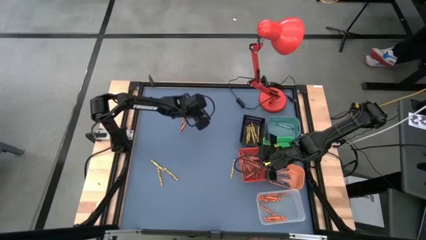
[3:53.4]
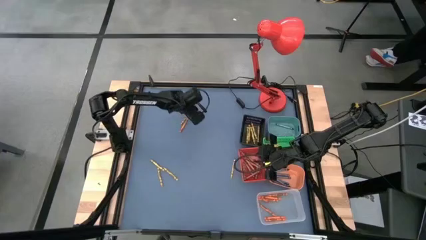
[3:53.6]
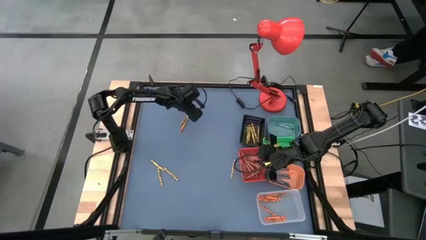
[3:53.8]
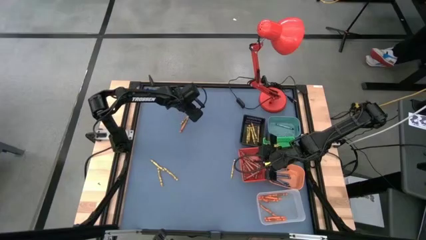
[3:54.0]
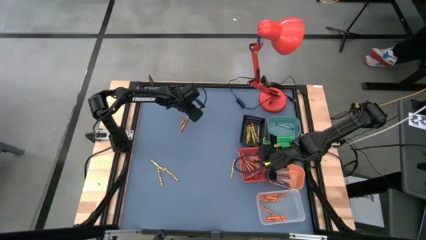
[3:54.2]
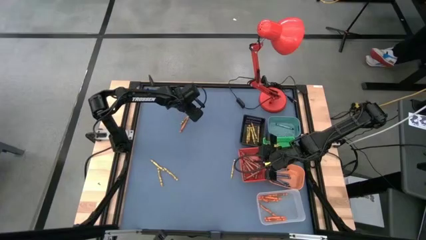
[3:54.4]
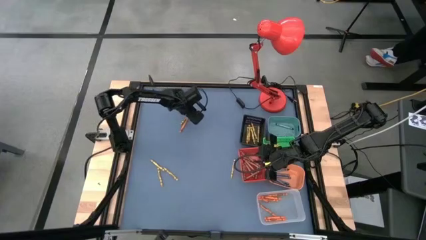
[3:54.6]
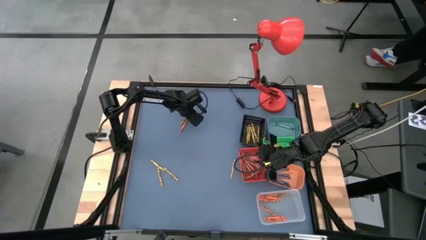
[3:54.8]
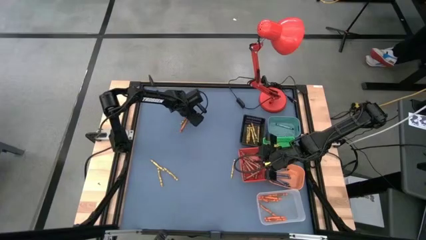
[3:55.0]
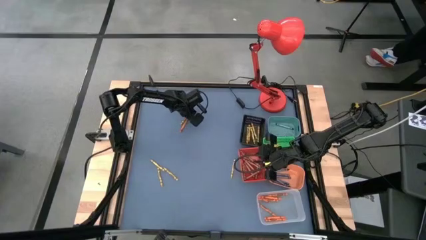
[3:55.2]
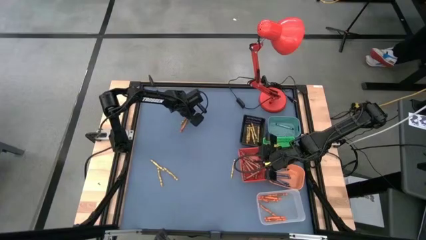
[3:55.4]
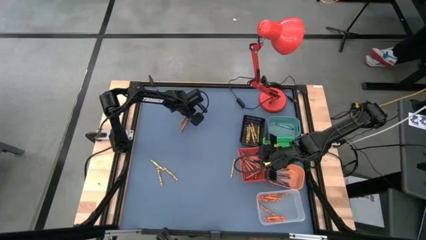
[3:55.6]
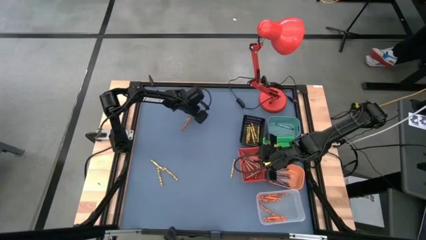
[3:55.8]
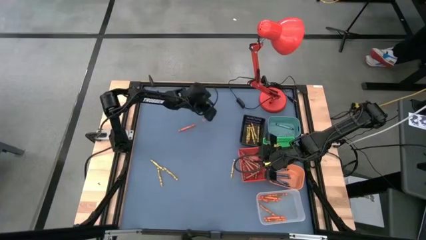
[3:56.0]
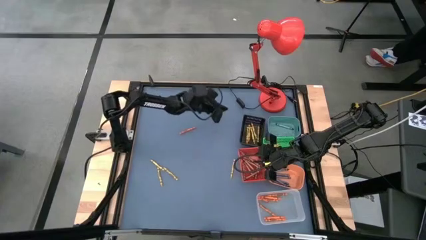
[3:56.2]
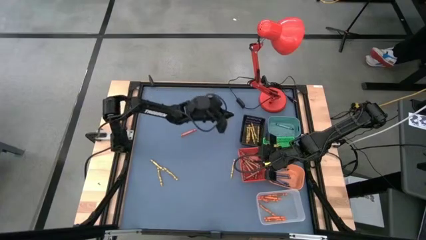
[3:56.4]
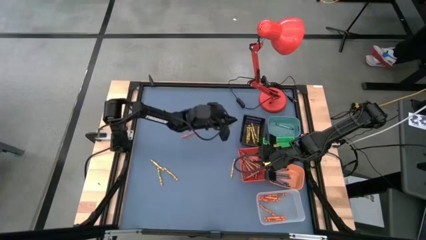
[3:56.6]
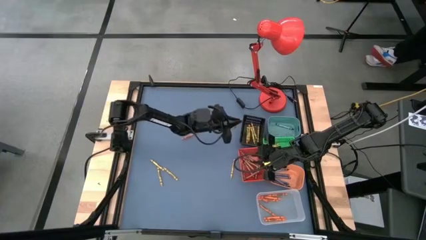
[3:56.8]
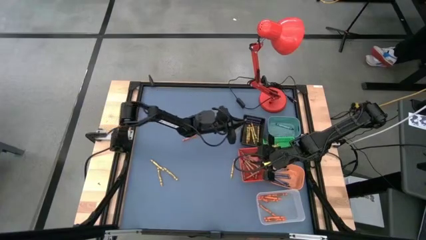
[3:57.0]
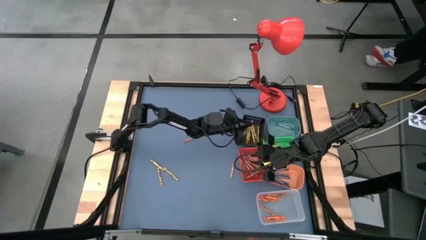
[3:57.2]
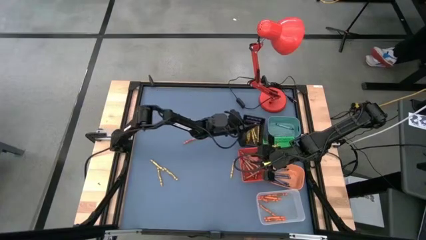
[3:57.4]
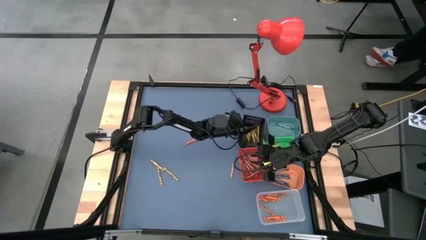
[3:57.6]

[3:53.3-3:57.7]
Task: Sort crayons
Put the yellow crayon into the black basket

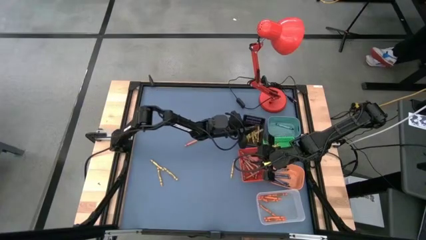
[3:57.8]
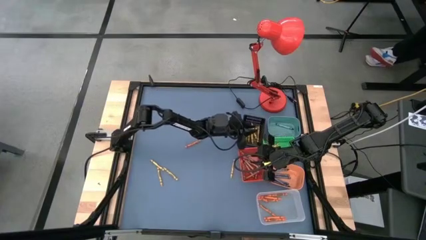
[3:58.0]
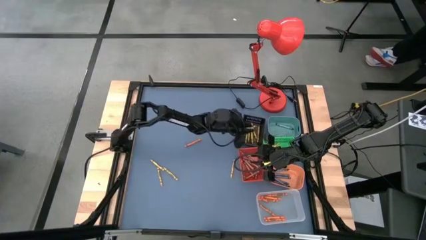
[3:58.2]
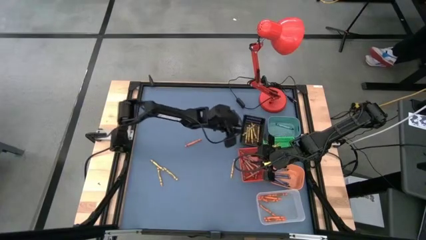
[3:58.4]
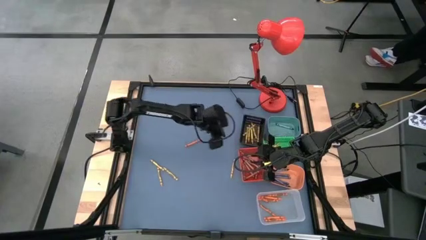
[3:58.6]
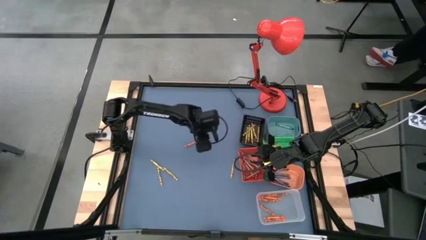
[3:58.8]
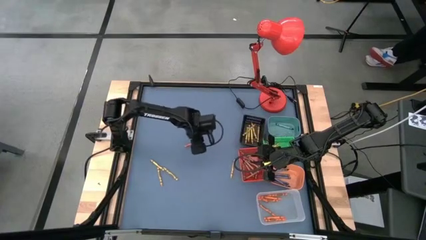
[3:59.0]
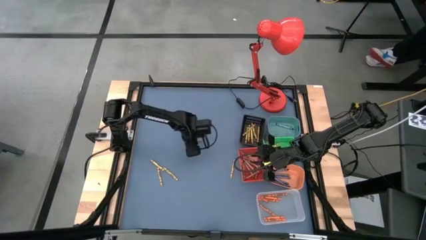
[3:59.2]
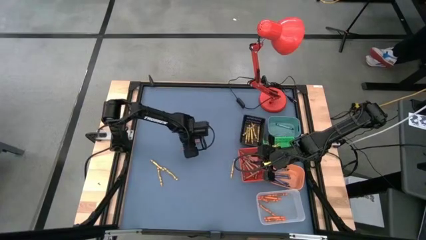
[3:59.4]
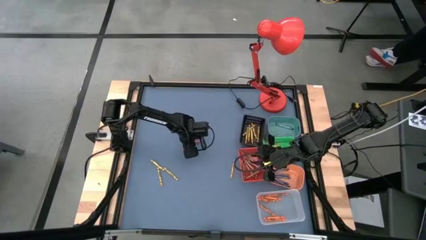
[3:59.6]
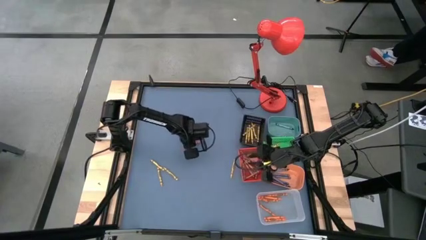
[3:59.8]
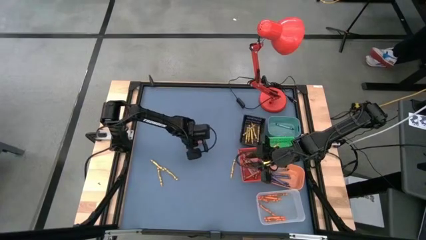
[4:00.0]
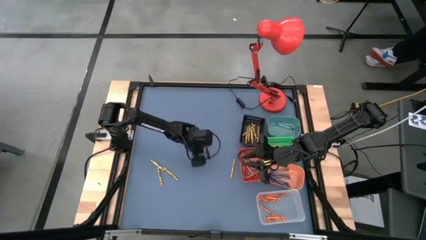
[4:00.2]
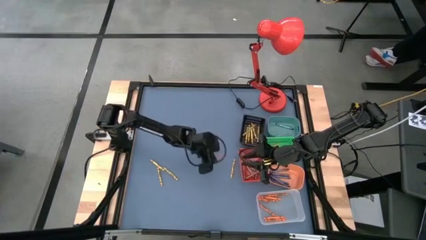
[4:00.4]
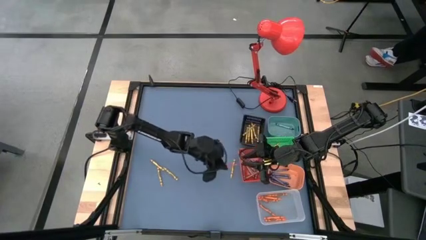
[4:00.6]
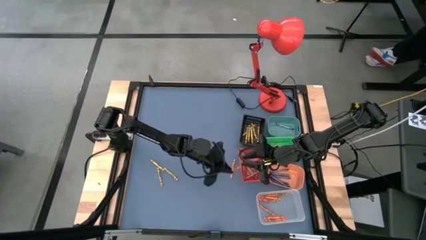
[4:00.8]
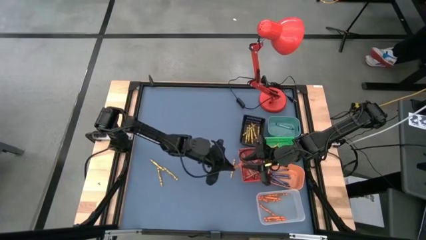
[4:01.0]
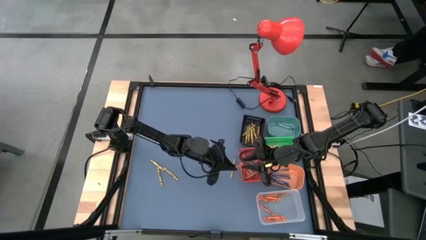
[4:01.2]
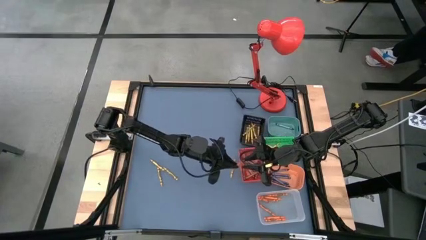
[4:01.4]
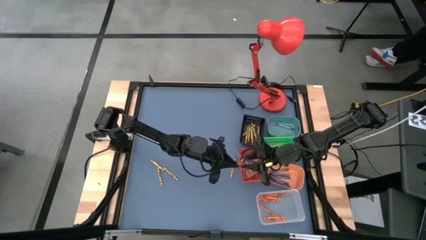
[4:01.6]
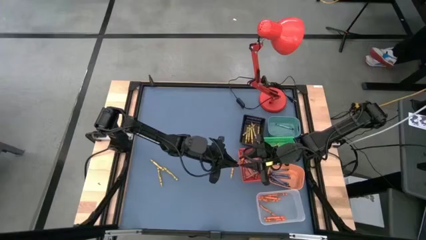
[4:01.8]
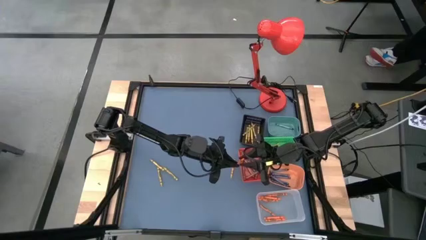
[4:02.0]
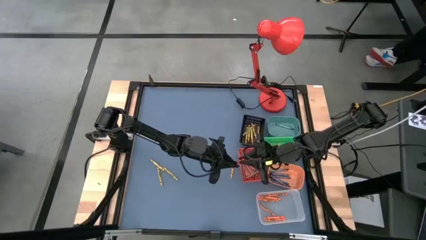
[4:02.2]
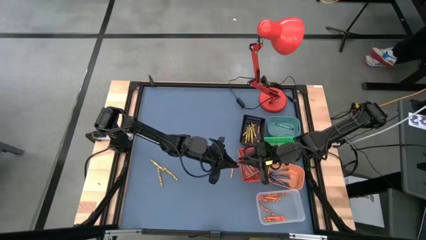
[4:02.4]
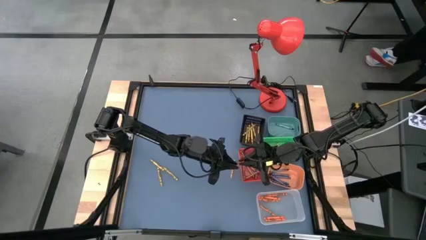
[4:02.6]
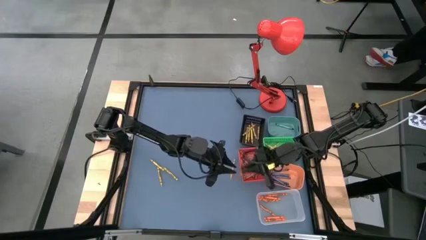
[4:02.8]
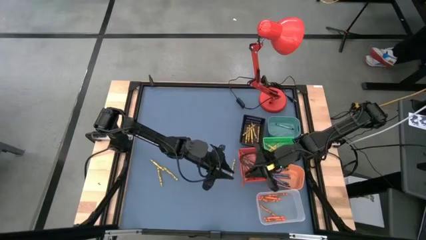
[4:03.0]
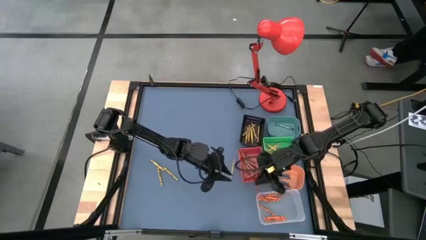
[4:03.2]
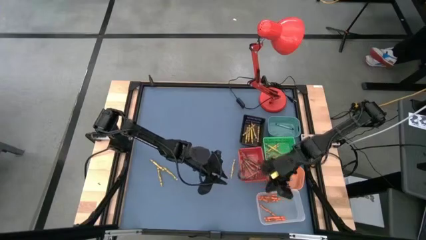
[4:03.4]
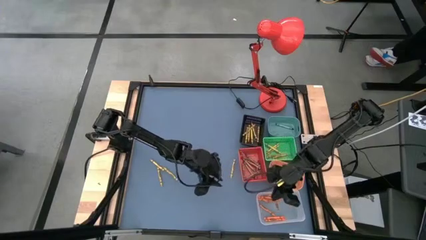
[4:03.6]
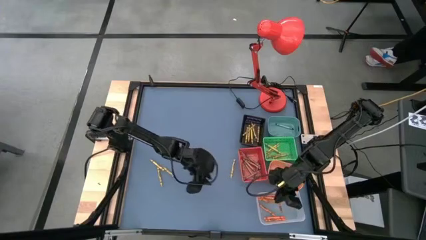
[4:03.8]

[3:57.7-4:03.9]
Put the orange crayon into the transparent bin

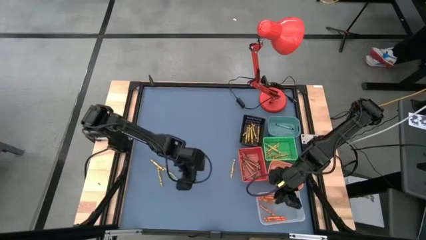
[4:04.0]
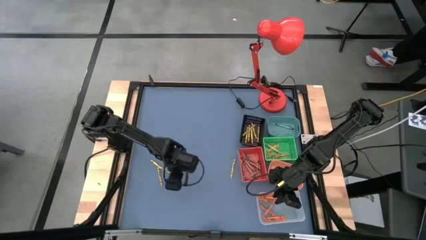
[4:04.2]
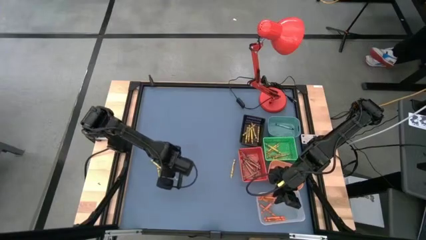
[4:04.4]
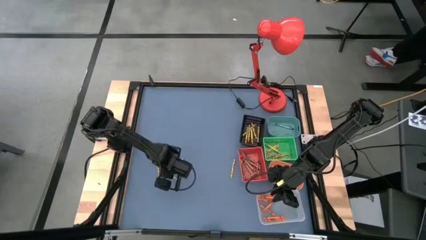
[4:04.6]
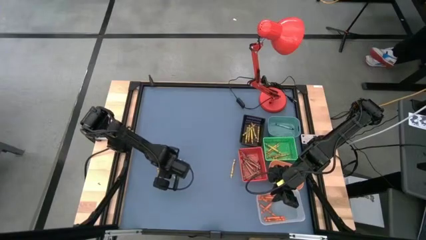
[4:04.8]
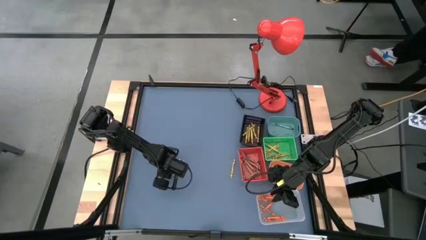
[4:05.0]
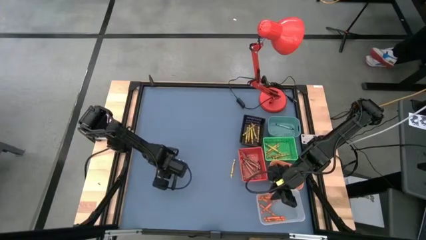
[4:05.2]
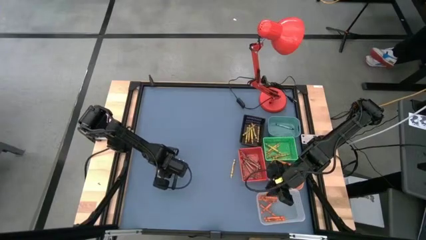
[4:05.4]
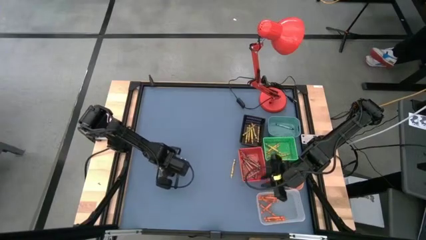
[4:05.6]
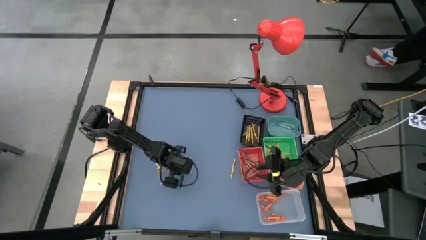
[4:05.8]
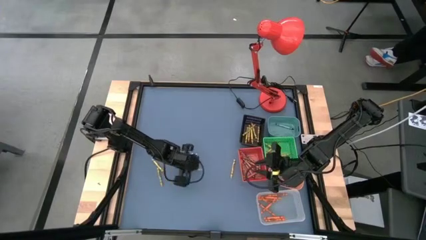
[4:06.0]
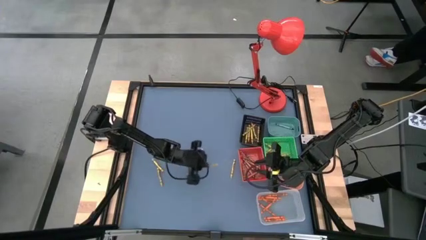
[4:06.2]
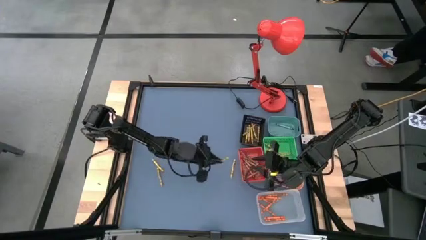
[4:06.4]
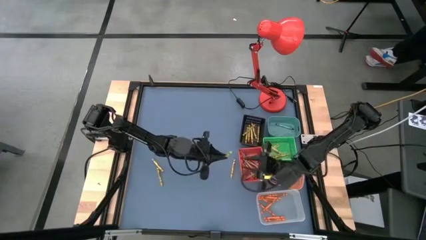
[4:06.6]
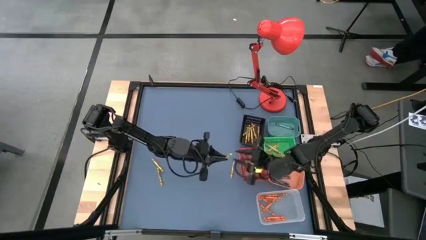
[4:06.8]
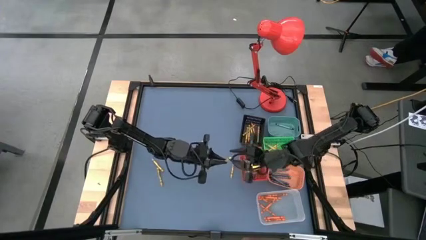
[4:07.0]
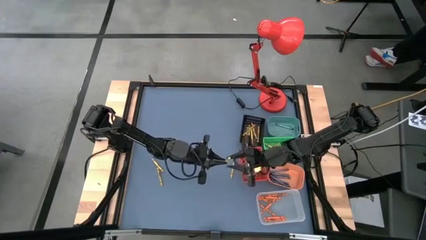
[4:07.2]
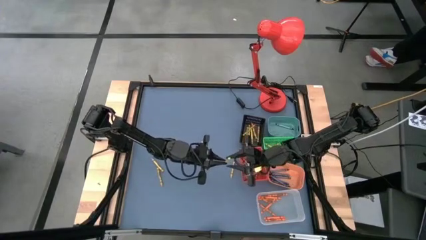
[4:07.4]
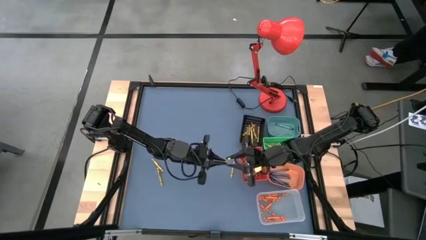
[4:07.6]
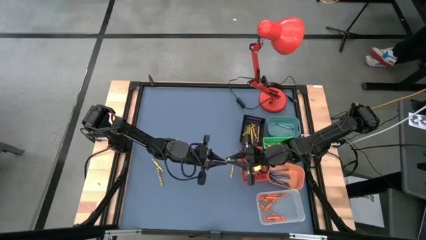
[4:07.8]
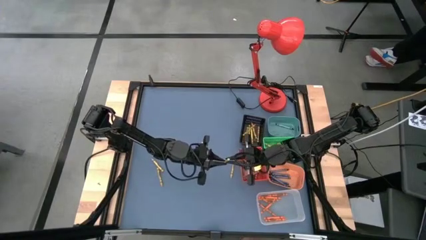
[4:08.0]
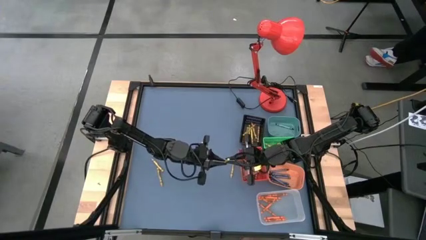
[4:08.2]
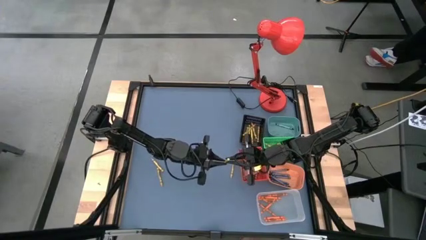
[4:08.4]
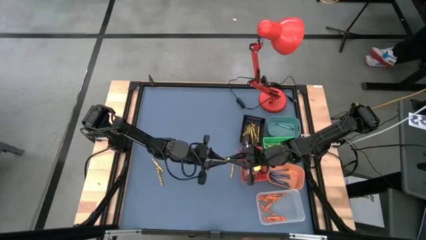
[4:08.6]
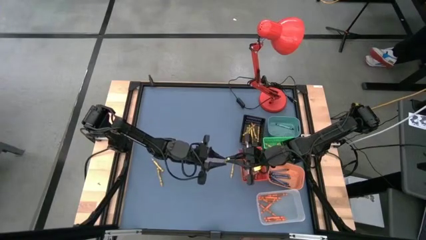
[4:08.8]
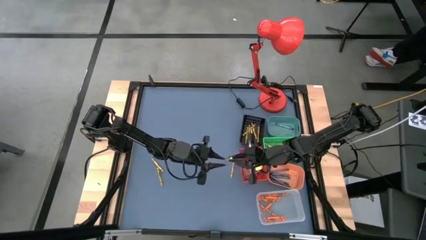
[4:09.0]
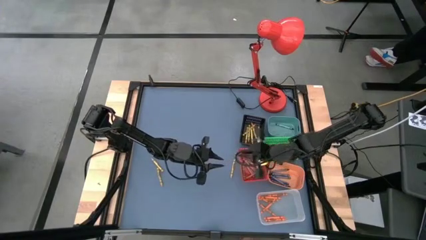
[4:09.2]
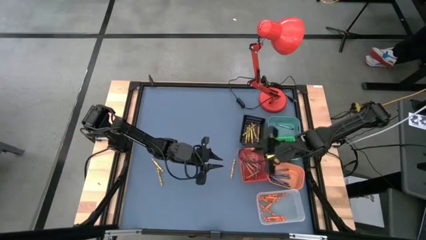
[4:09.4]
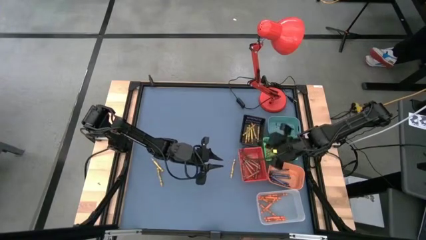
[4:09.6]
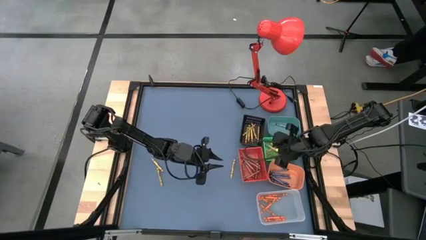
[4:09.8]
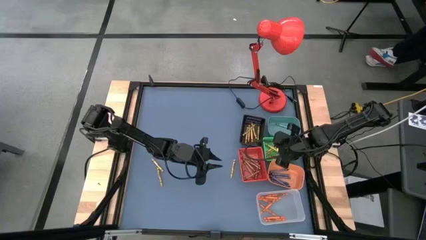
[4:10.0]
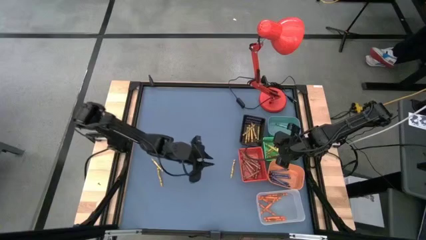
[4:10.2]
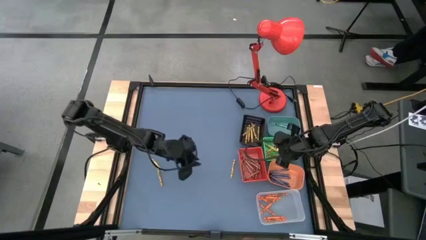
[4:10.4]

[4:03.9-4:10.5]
Put the yellow green crayon into the green basket
